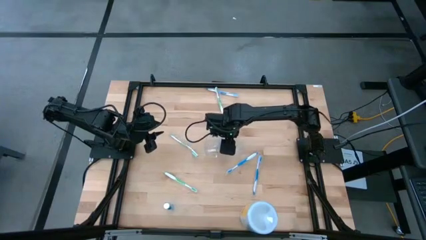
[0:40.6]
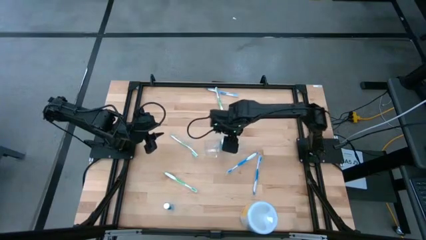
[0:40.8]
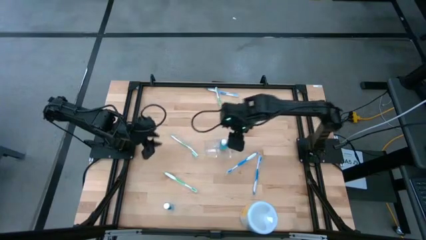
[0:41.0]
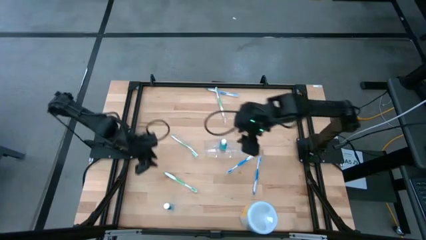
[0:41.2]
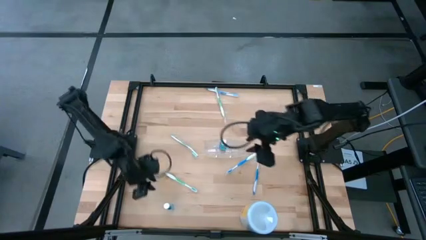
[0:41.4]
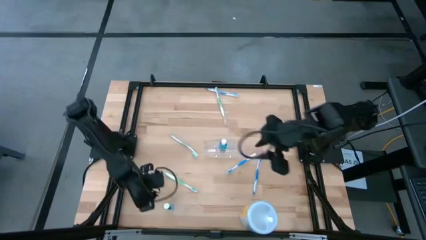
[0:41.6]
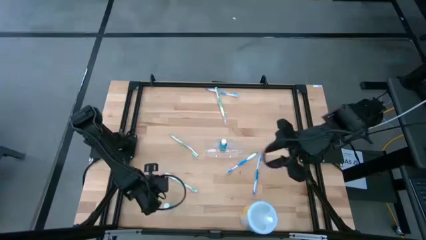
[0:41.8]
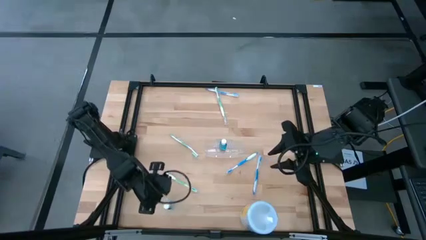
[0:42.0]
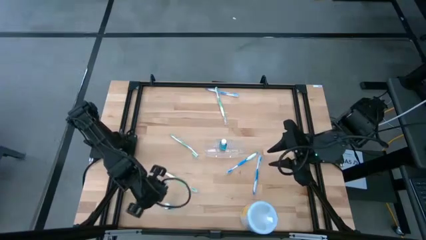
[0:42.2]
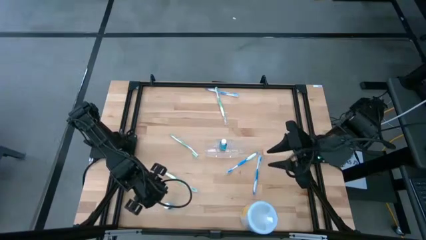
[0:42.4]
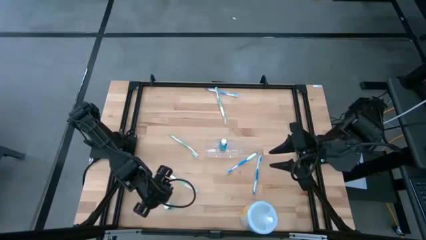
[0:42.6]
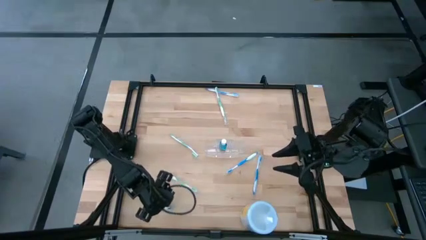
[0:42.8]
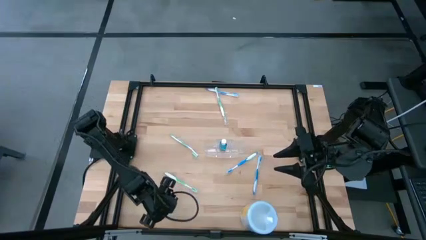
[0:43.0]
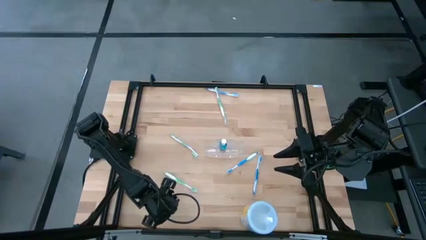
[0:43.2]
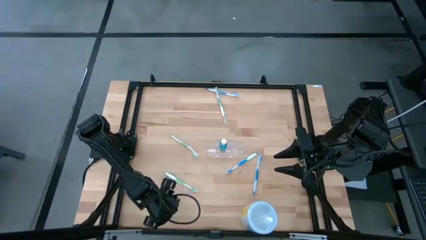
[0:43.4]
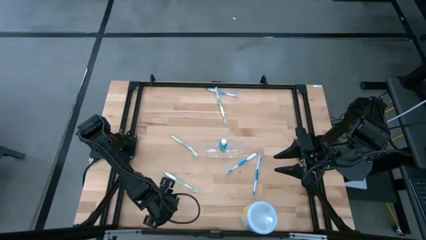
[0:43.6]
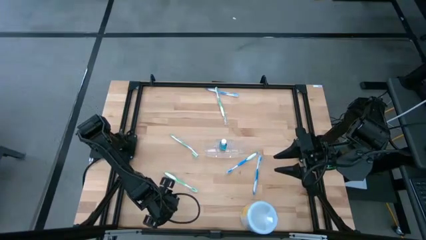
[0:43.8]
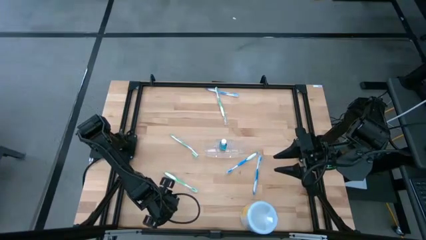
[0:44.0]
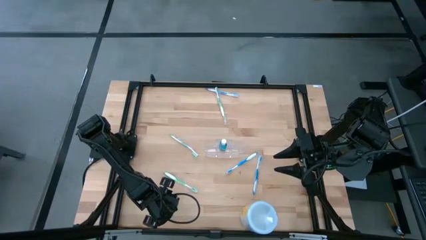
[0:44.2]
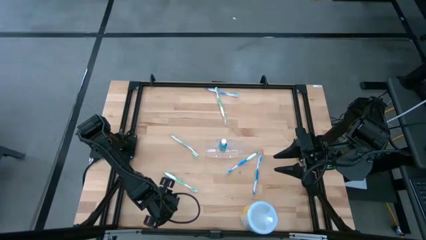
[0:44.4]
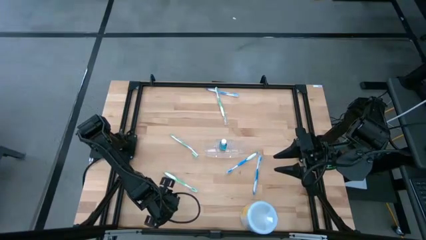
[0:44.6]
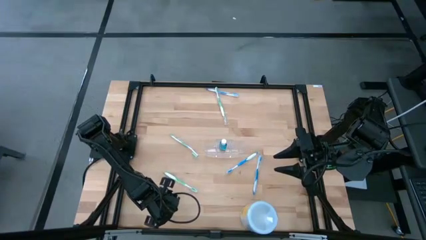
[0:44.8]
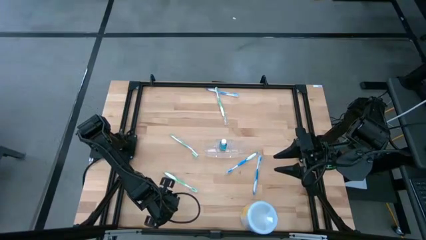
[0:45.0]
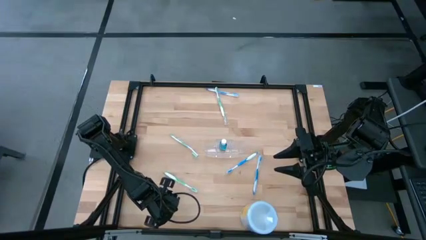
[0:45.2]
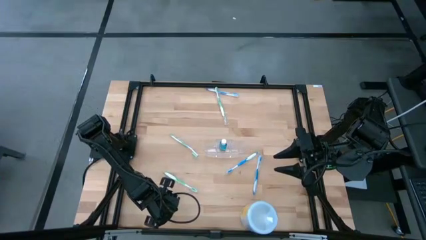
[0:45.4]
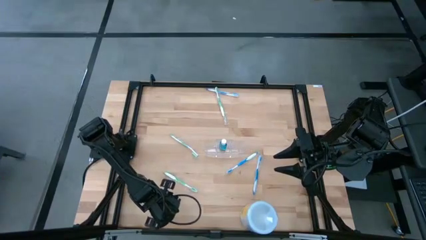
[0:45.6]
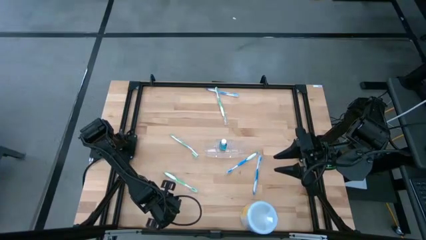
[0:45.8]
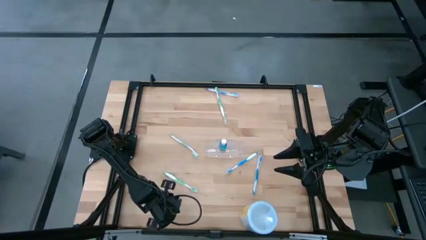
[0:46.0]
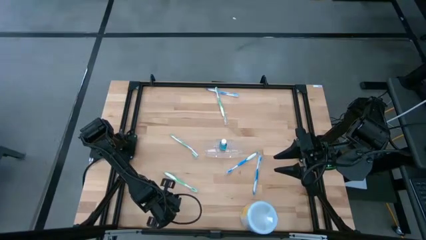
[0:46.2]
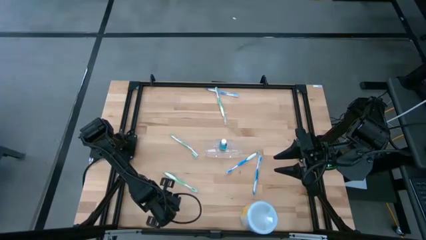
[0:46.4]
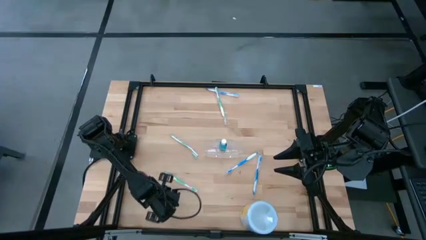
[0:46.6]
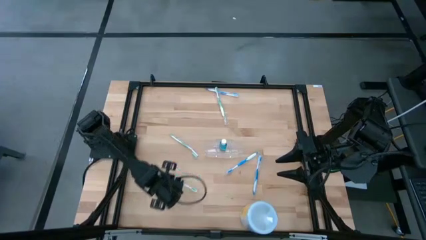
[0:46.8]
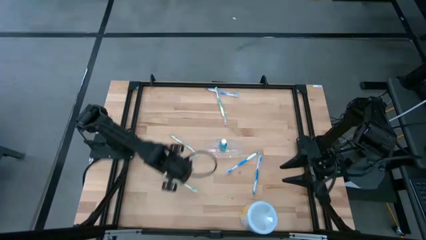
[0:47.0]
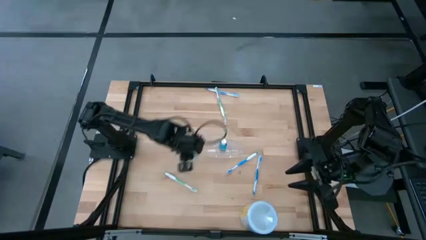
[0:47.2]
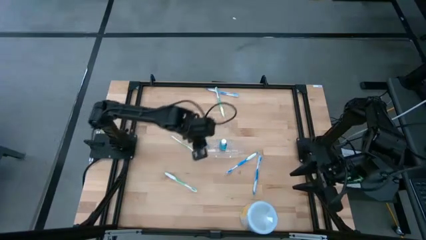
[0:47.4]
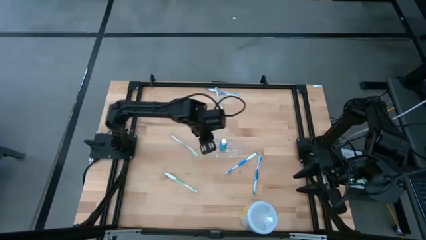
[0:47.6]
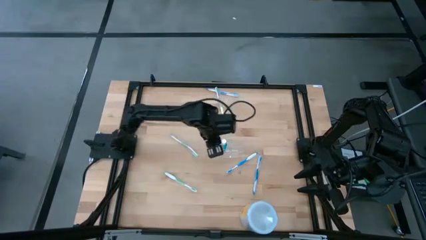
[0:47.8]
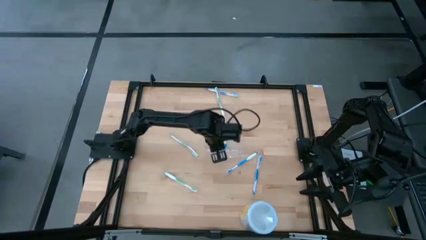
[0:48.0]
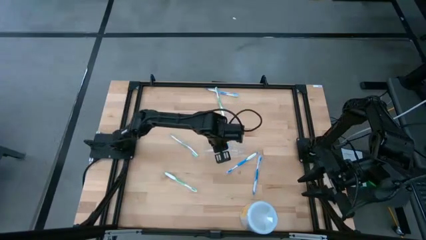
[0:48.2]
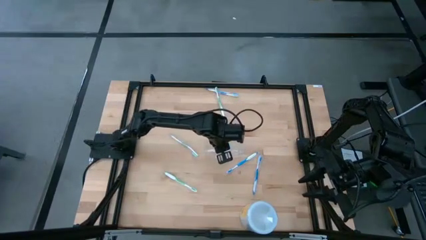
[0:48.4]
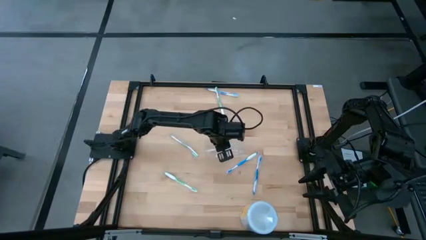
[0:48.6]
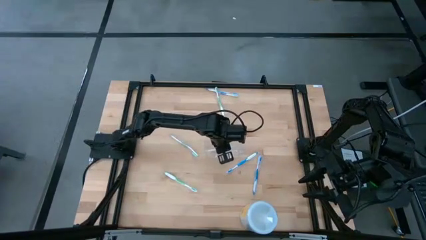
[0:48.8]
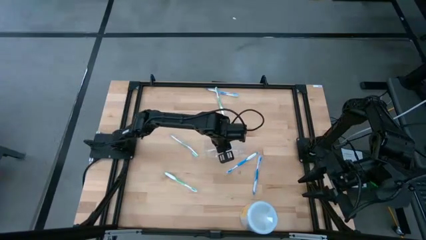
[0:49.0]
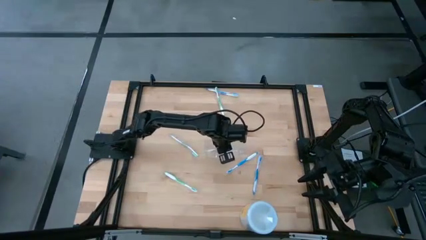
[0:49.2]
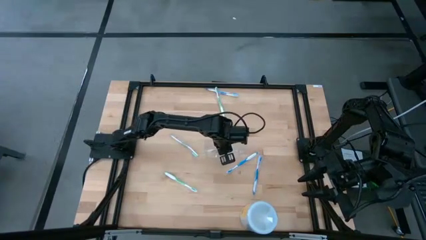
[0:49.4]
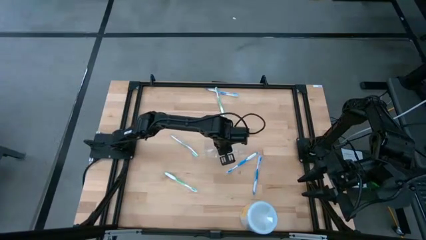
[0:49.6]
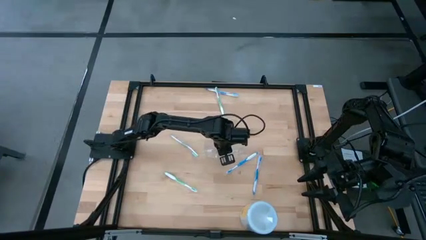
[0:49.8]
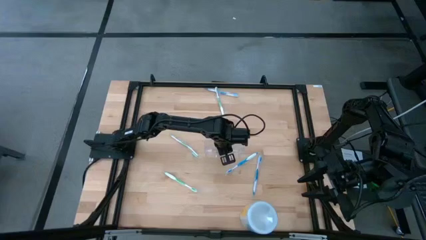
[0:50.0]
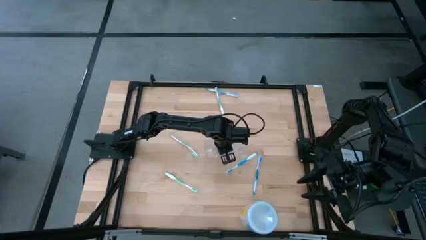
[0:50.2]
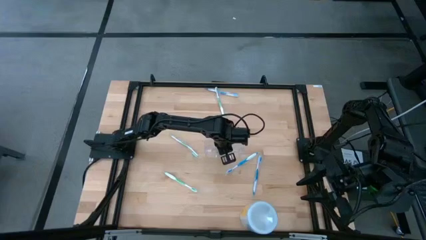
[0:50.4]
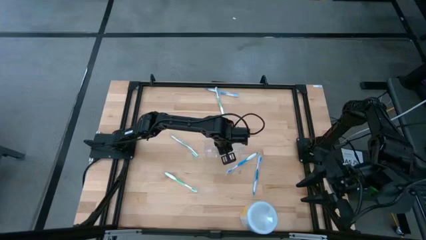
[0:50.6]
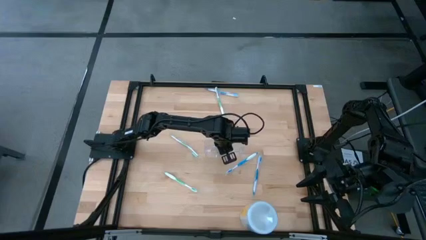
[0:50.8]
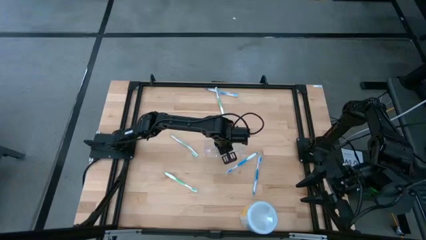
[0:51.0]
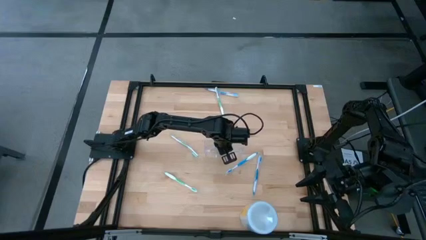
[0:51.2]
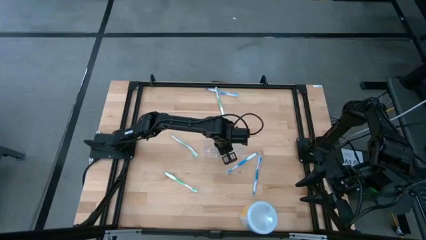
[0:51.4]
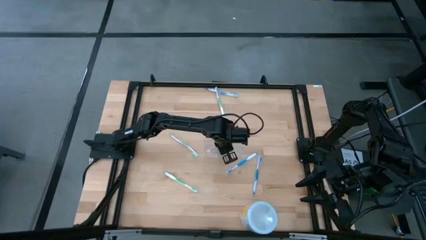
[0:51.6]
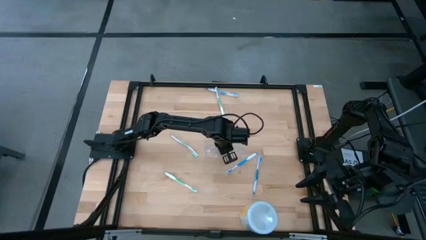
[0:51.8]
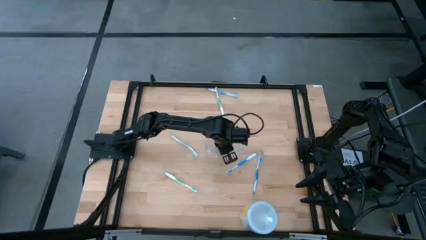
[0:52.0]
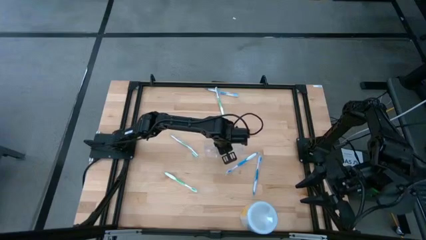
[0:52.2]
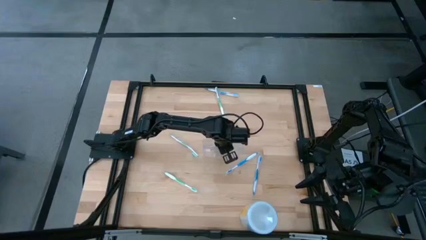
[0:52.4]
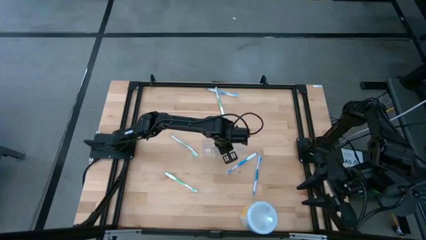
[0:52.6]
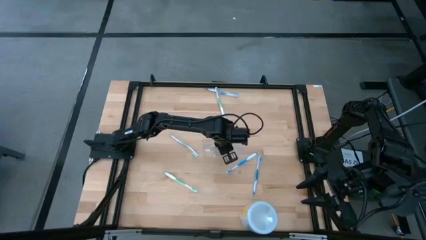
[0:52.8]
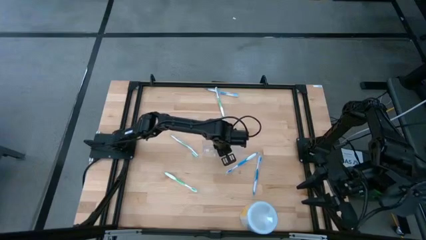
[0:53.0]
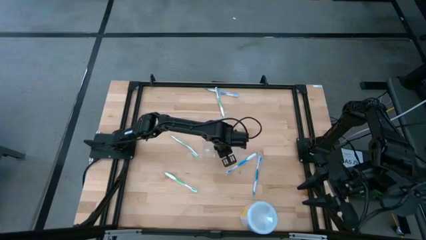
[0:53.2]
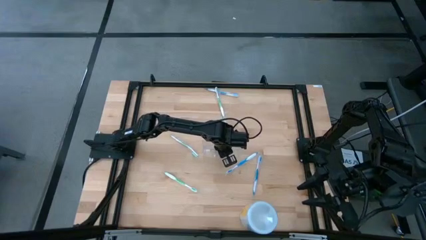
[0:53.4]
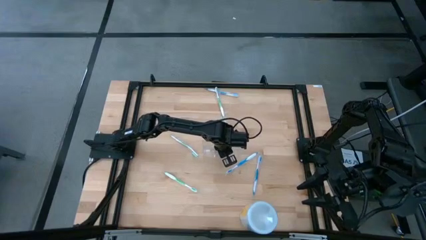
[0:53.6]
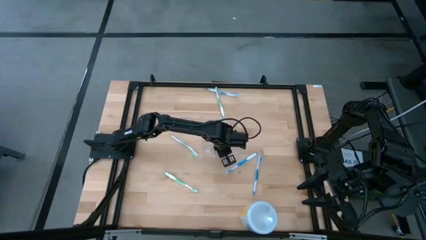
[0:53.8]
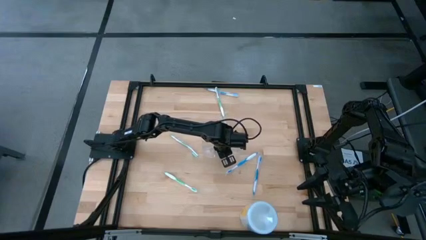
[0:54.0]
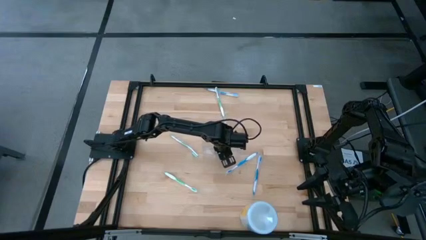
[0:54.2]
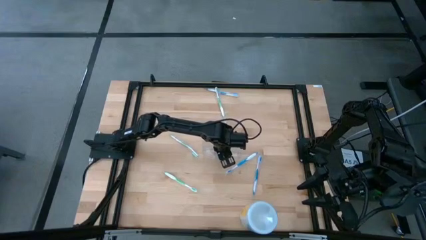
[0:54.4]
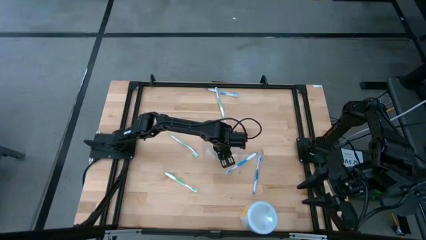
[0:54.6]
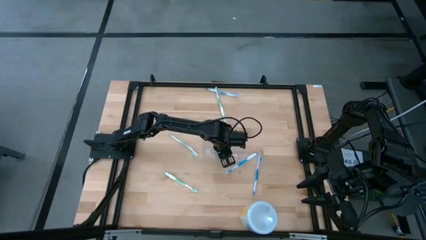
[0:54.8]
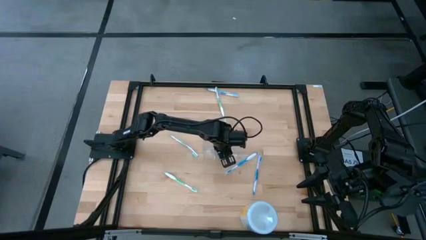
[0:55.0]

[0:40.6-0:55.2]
Task: Pick & Place toothbrushing station
Put the blue mouthwash into the transparent organizer

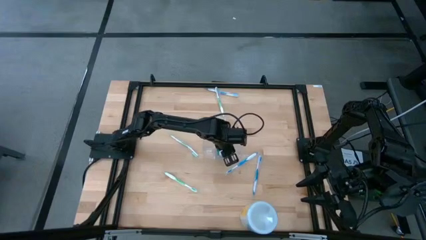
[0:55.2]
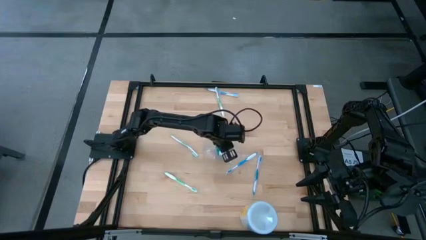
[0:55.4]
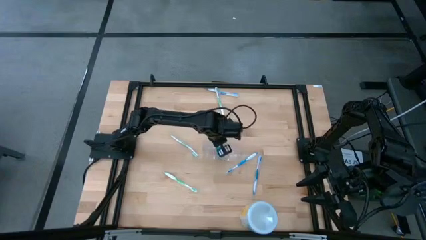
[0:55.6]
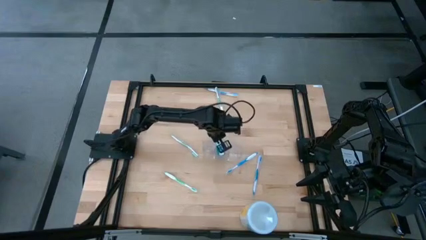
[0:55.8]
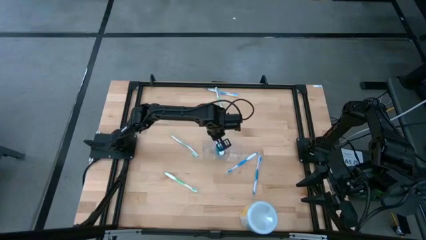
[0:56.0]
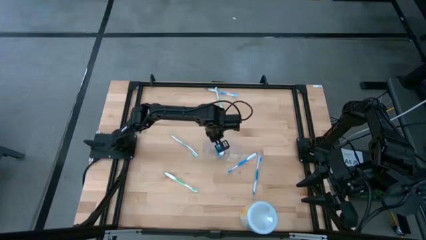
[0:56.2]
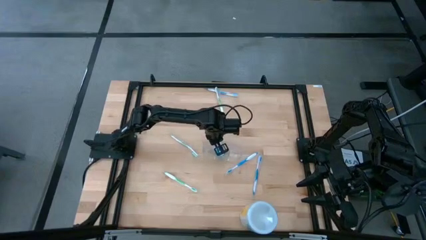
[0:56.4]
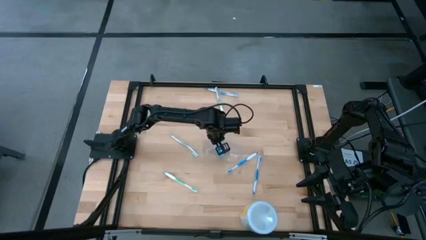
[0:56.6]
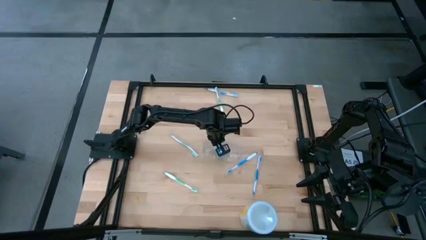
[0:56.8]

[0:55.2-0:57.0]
Adjust the top blue mouthwash in the transparent organizer
